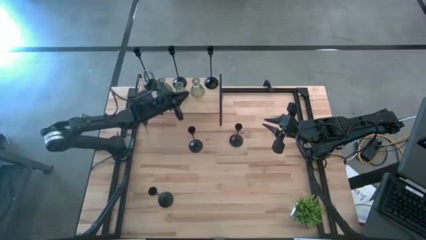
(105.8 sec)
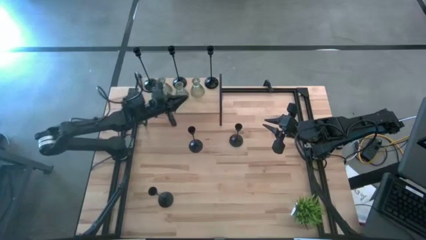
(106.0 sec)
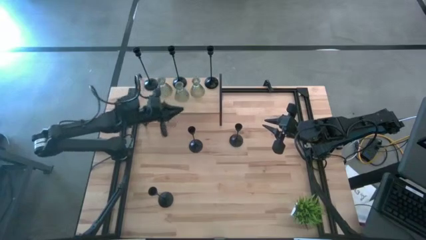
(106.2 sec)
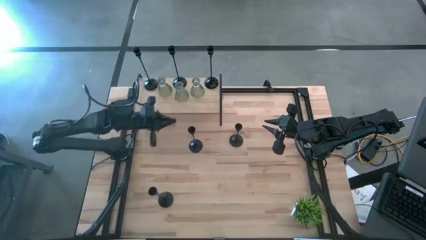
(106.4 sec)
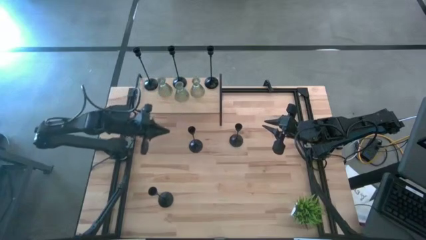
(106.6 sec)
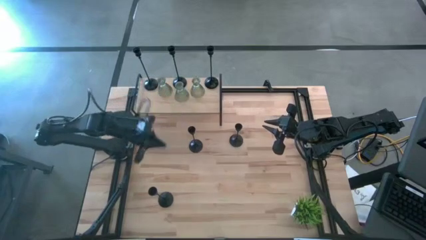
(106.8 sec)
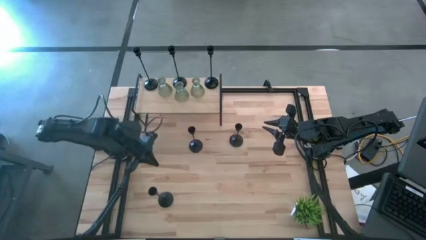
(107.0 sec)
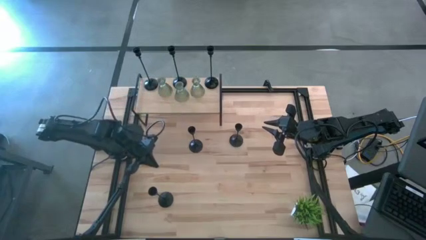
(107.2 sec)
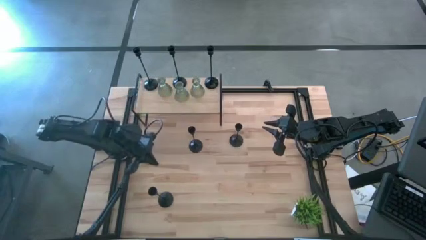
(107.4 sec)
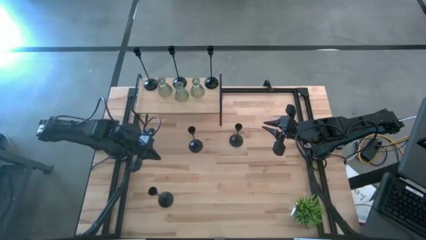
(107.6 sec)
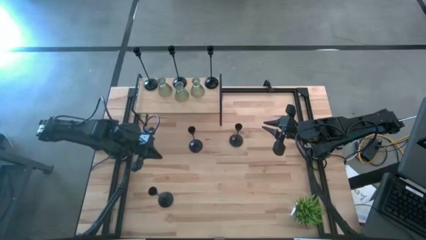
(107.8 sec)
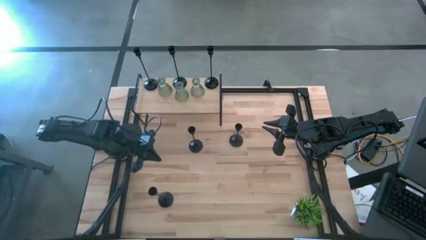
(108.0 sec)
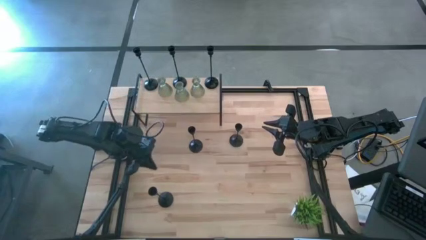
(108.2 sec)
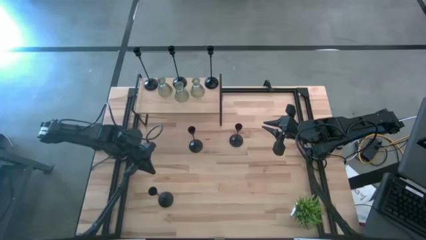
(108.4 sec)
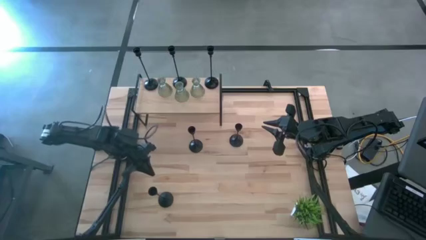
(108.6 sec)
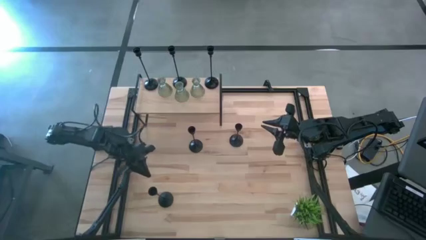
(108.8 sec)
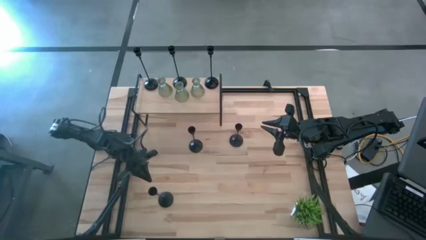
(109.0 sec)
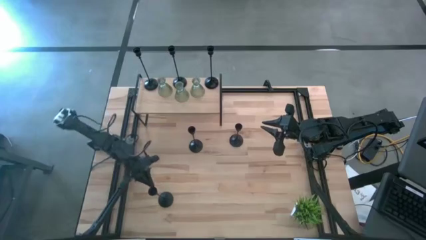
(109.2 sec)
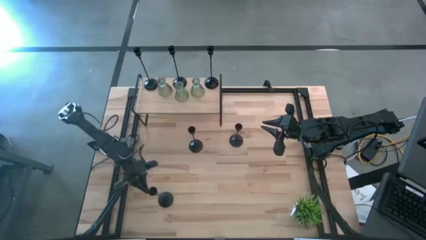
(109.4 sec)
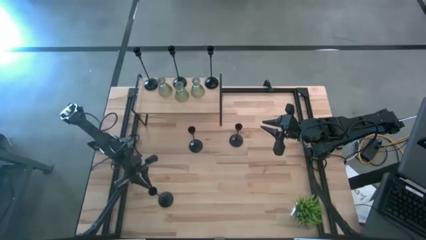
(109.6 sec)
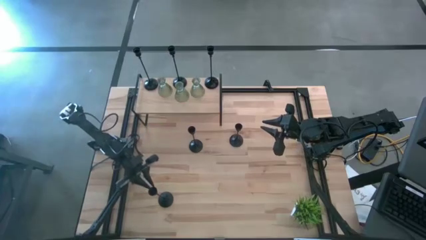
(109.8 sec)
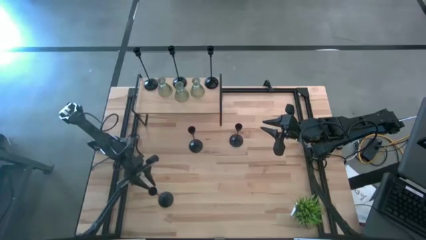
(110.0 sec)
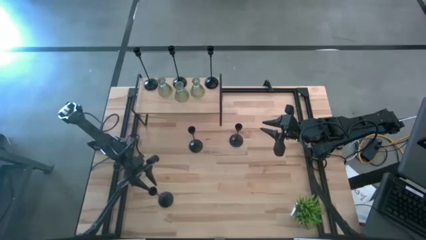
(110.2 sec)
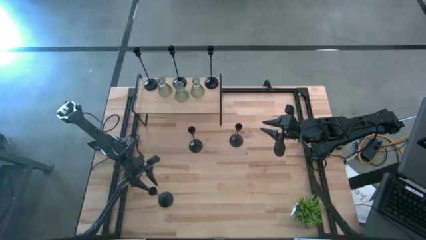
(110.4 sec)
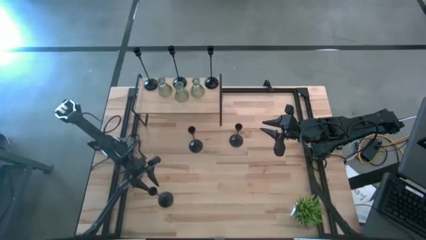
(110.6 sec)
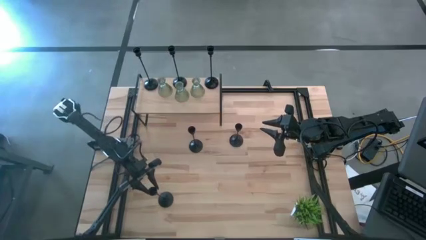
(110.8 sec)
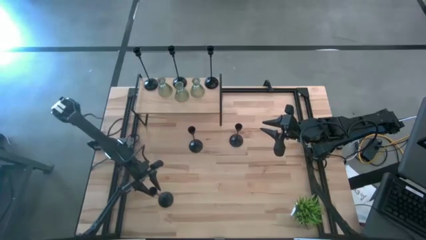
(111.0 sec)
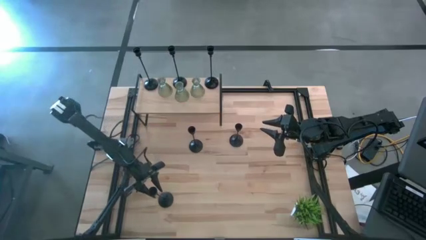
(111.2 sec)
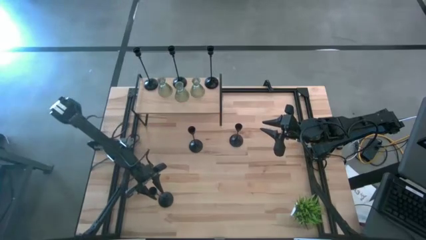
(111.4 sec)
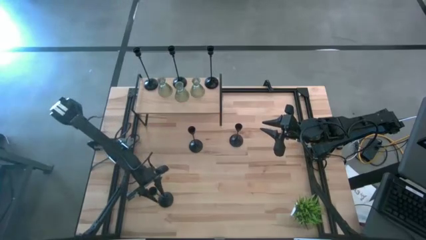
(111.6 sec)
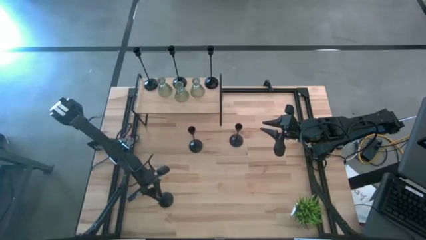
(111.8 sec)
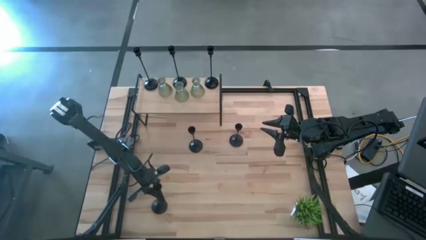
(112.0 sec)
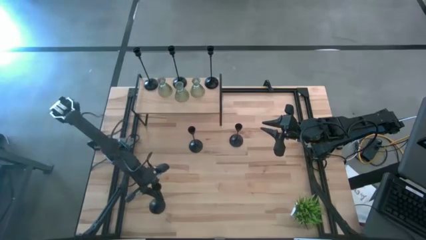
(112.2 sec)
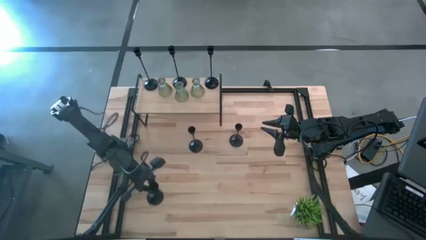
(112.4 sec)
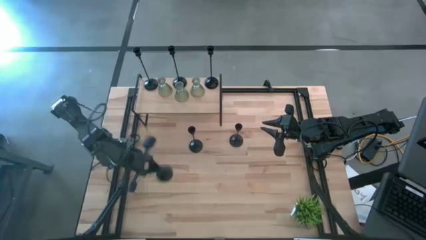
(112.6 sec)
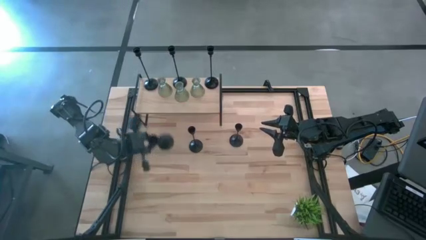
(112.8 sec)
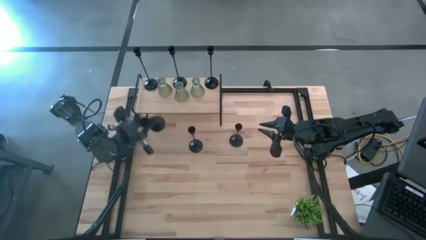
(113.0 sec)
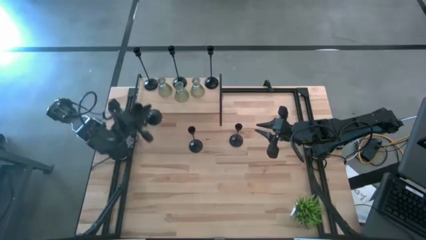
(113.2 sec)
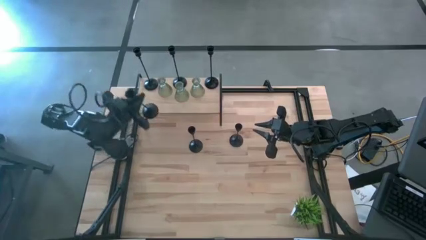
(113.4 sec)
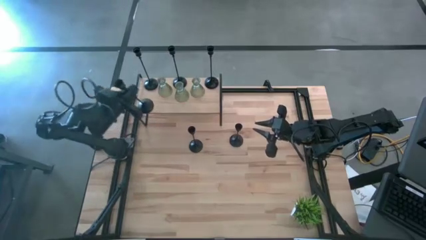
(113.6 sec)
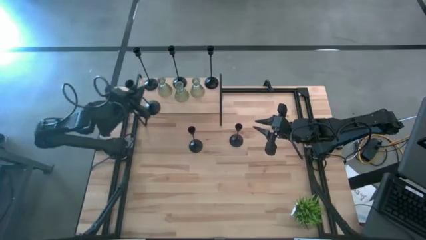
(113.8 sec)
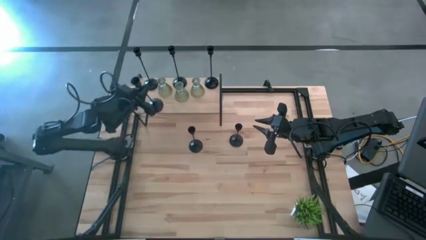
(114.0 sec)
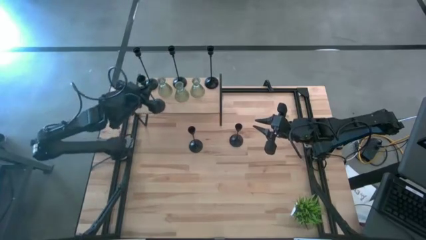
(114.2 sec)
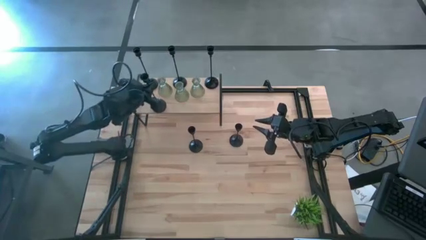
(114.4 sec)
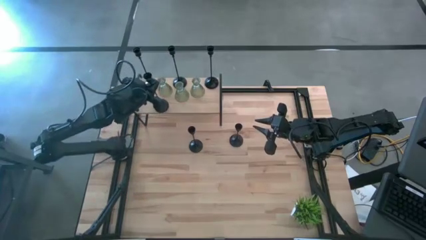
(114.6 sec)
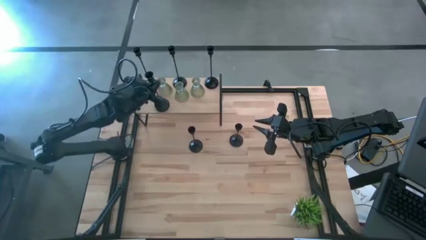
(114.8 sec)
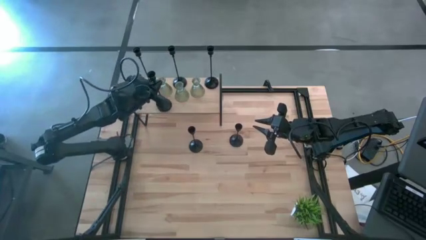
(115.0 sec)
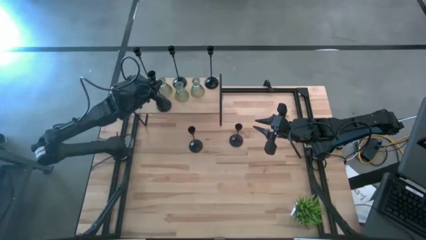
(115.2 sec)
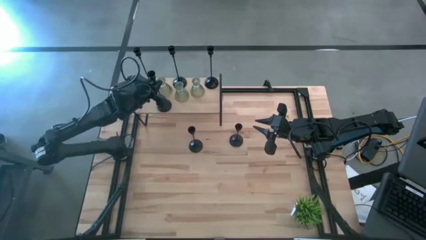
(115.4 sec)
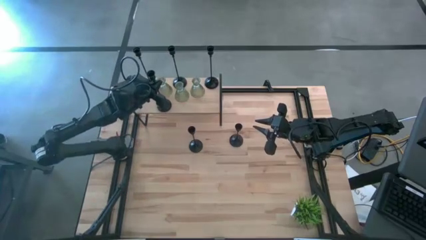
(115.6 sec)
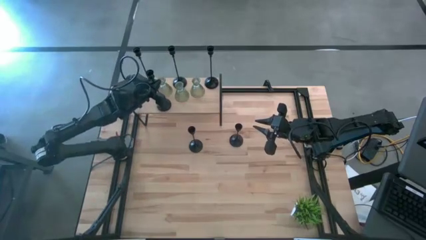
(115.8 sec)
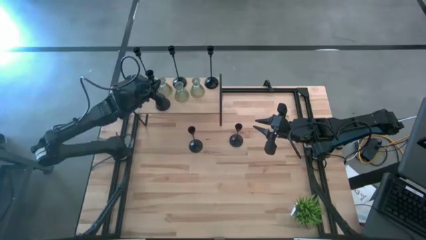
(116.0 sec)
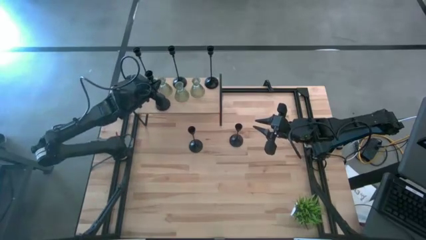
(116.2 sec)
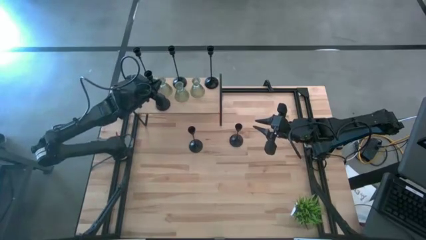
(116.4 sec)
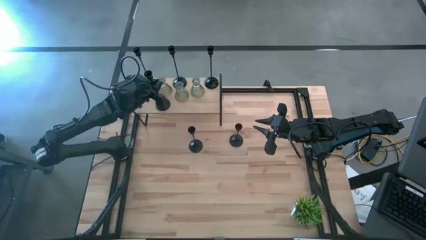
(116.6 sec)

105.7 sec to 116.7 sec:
Task: Pick & Place candle stick holders
Put the medium black candle holder on the shelf
